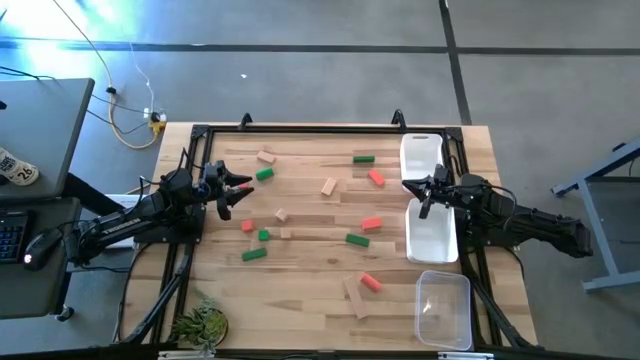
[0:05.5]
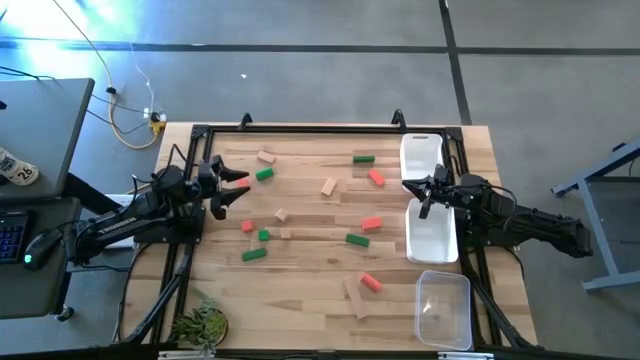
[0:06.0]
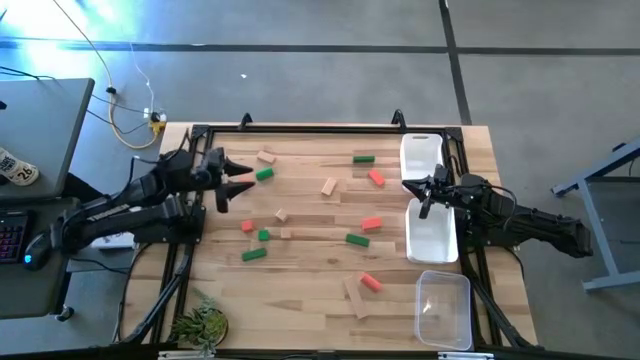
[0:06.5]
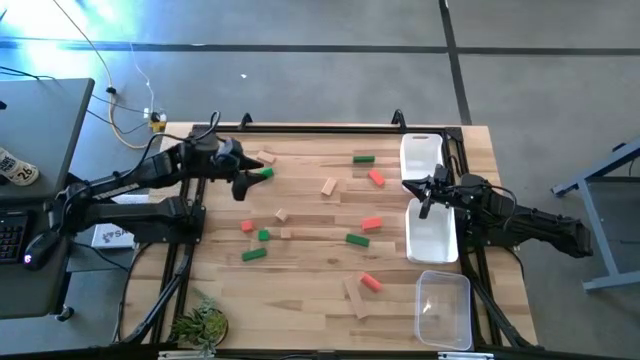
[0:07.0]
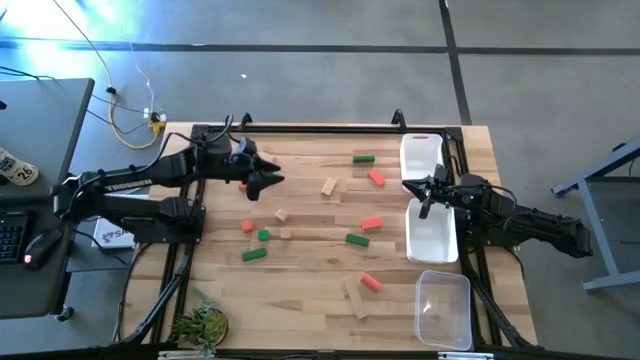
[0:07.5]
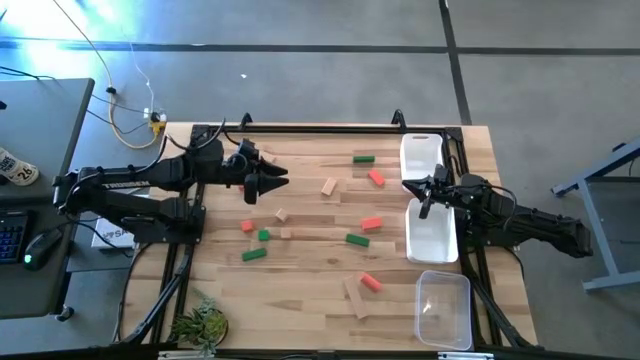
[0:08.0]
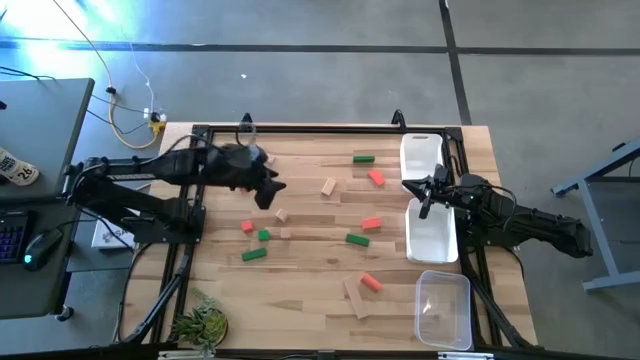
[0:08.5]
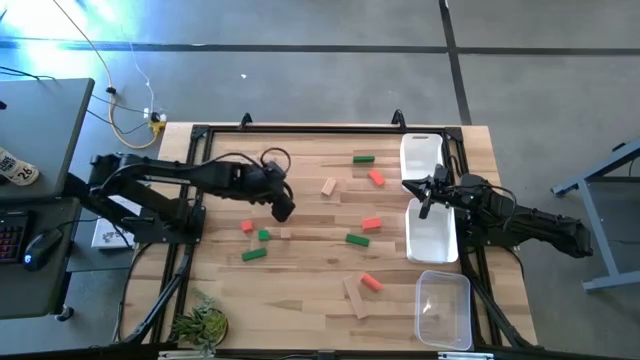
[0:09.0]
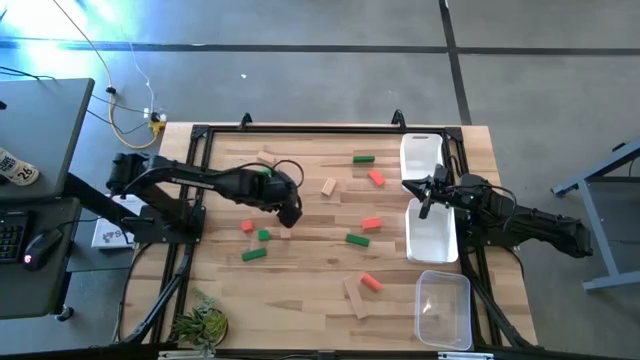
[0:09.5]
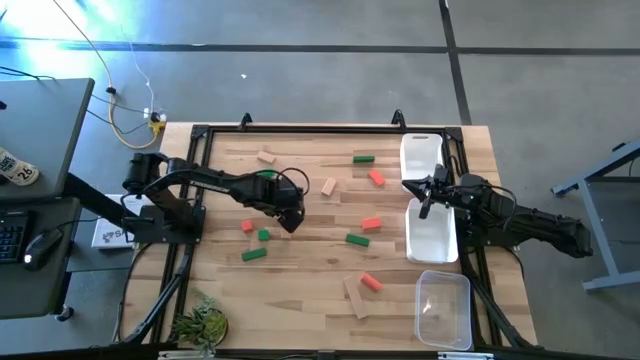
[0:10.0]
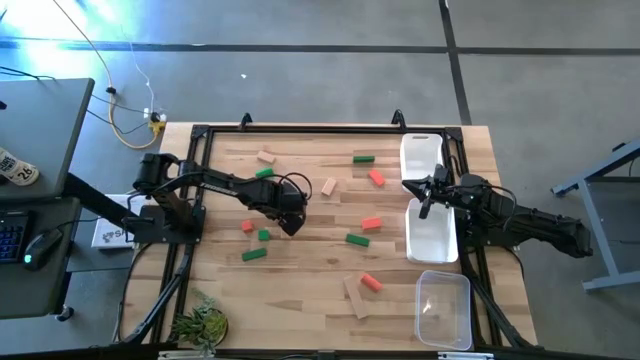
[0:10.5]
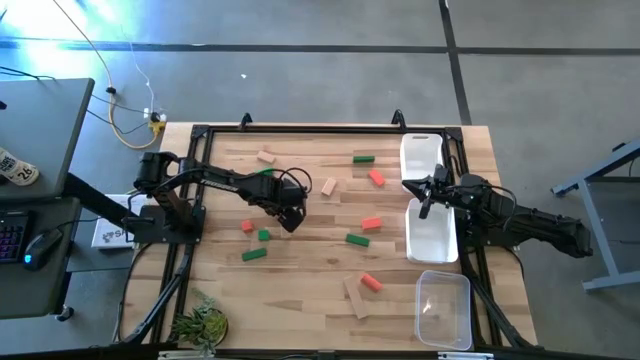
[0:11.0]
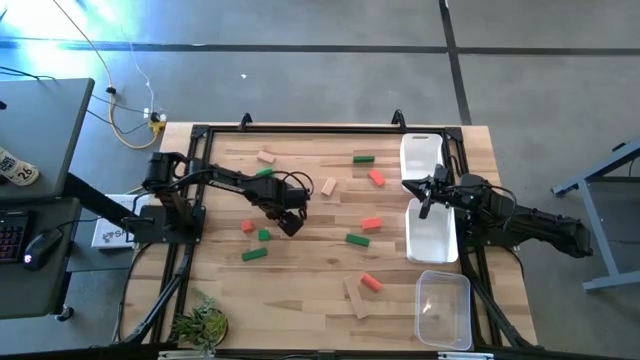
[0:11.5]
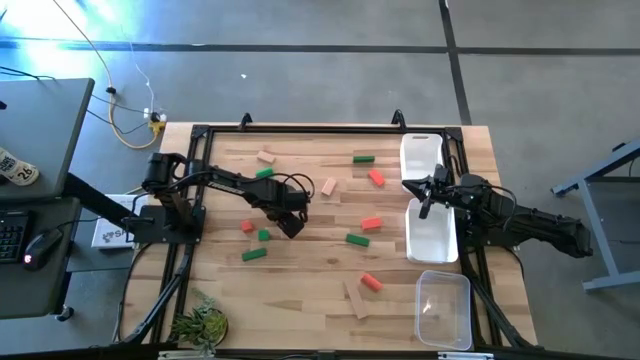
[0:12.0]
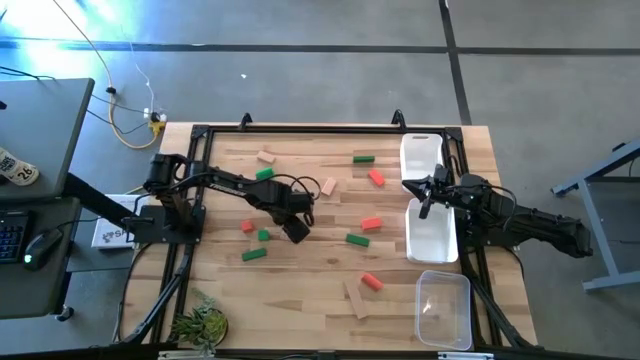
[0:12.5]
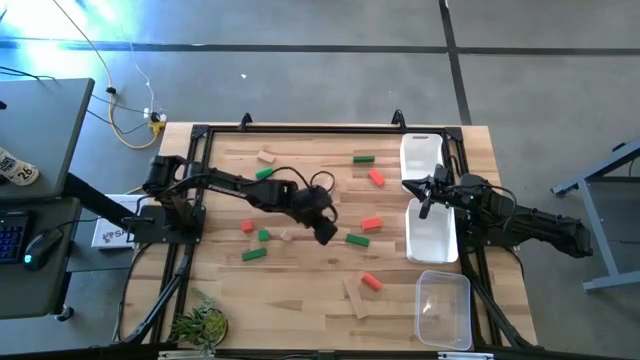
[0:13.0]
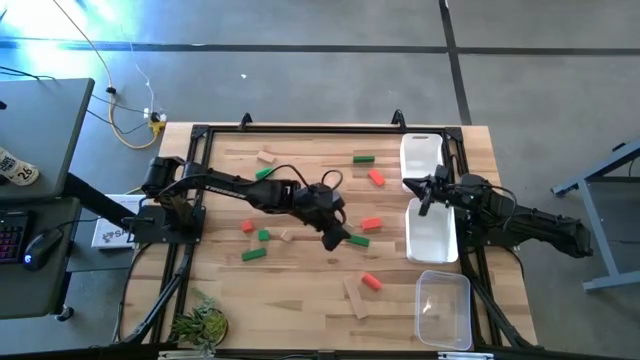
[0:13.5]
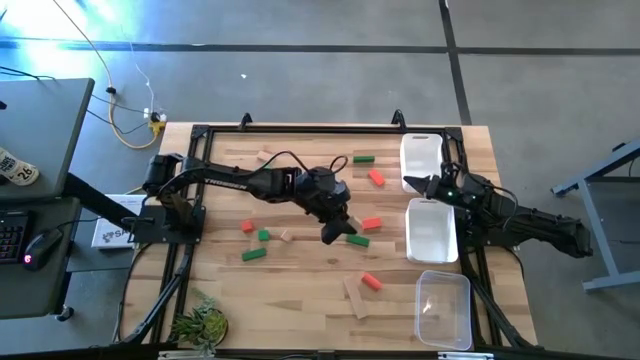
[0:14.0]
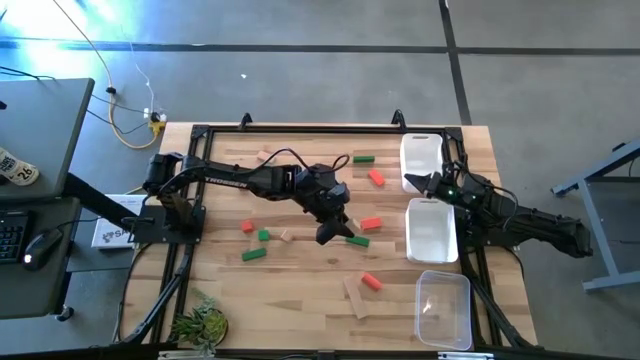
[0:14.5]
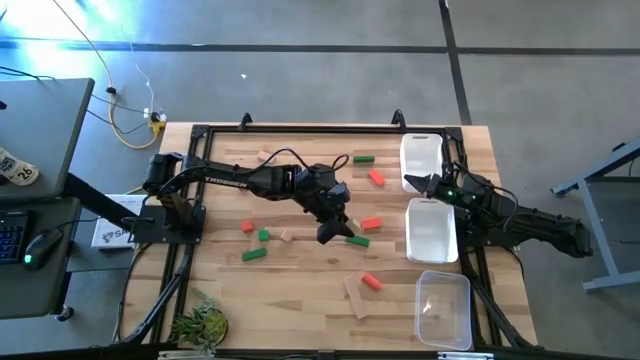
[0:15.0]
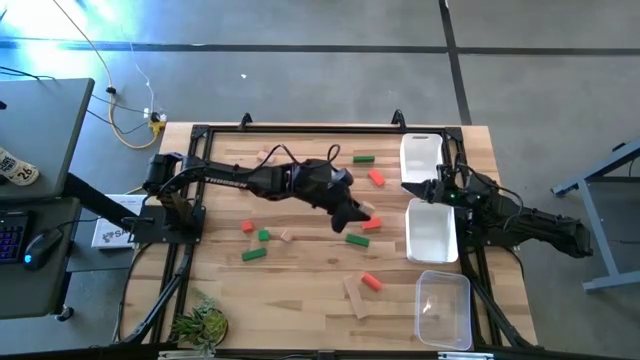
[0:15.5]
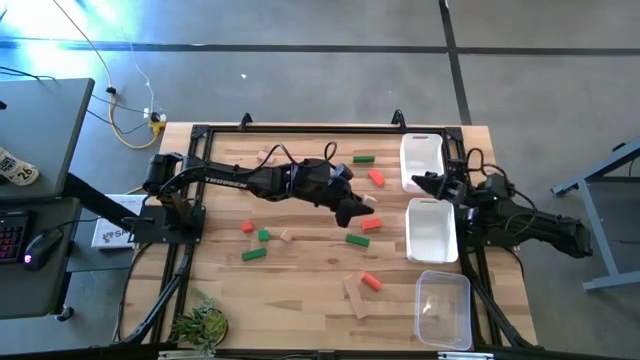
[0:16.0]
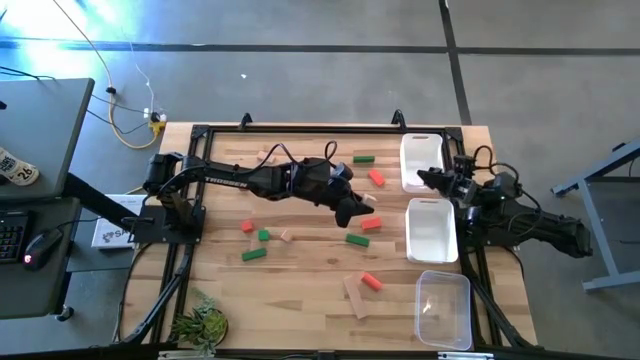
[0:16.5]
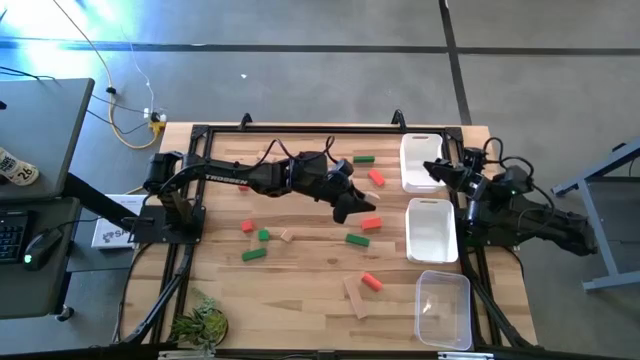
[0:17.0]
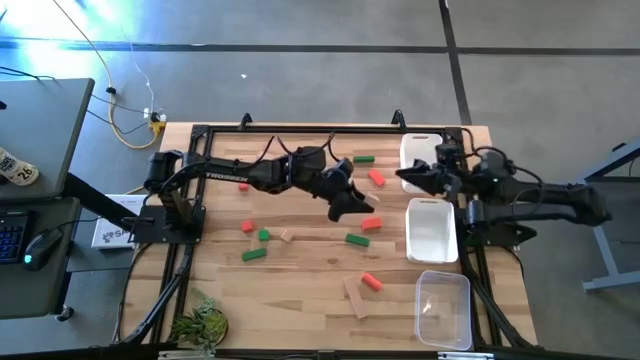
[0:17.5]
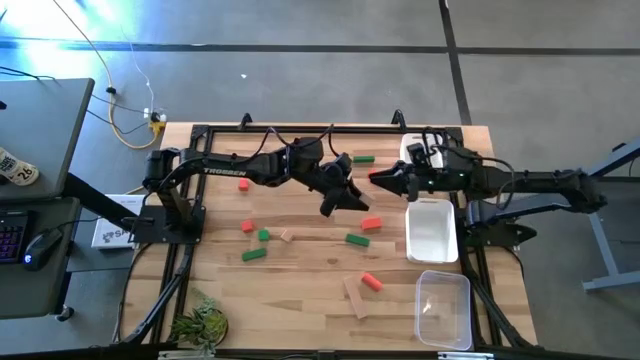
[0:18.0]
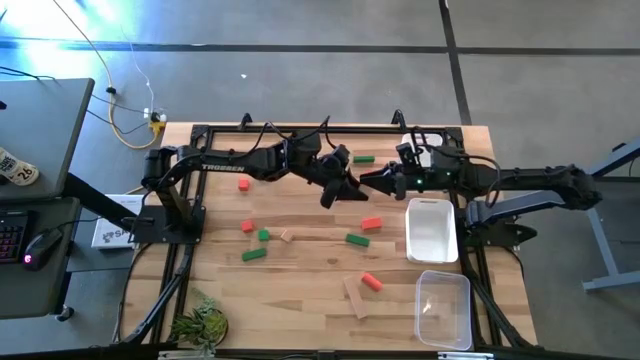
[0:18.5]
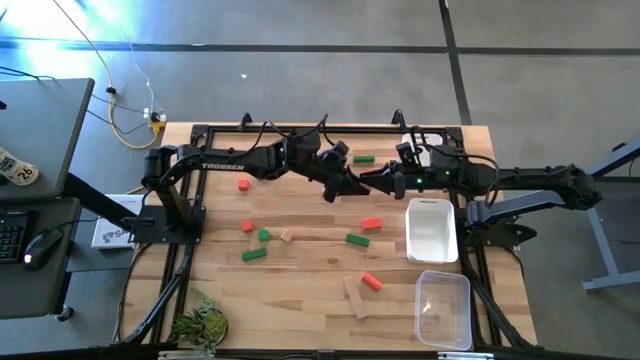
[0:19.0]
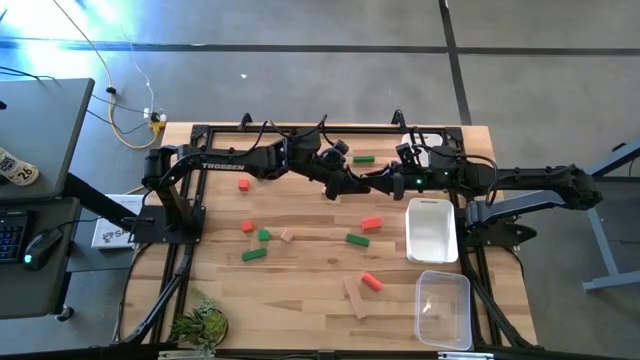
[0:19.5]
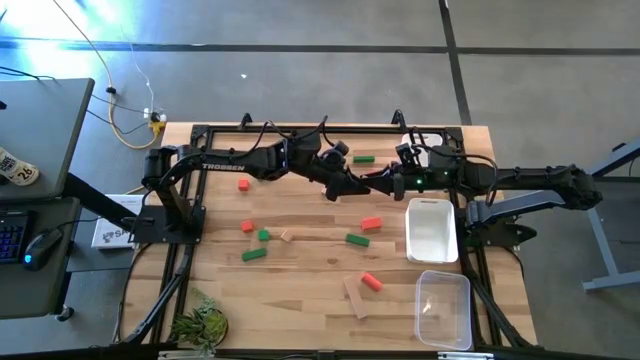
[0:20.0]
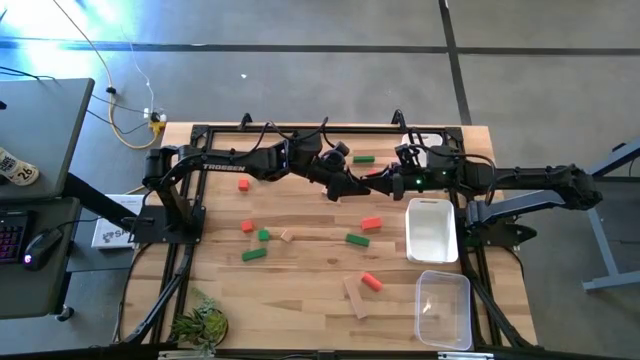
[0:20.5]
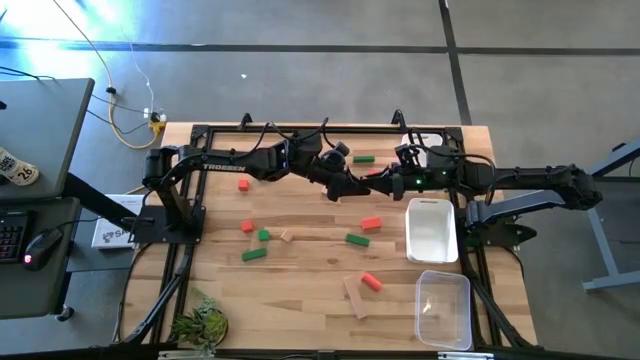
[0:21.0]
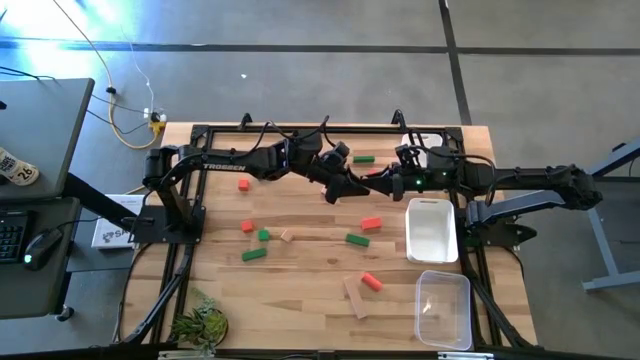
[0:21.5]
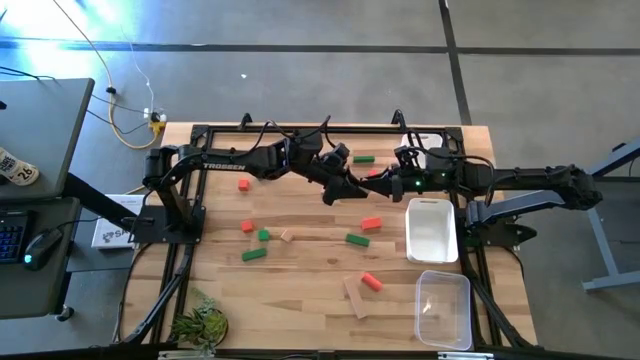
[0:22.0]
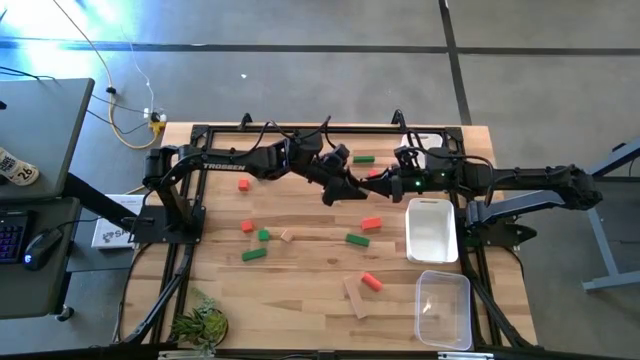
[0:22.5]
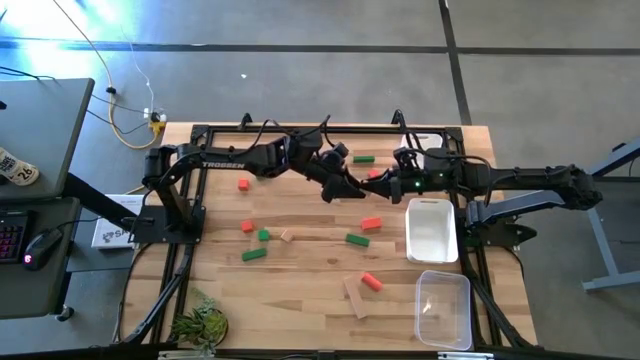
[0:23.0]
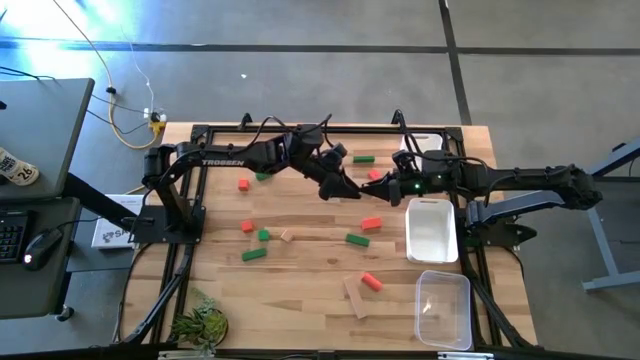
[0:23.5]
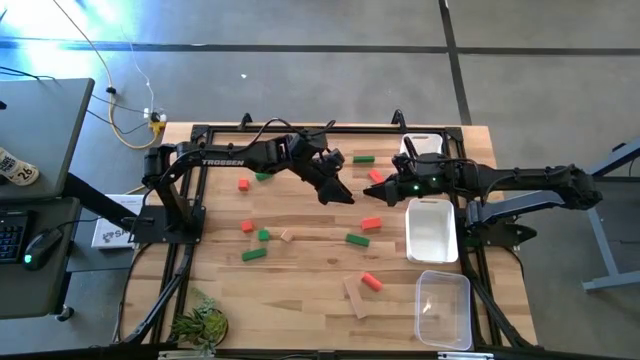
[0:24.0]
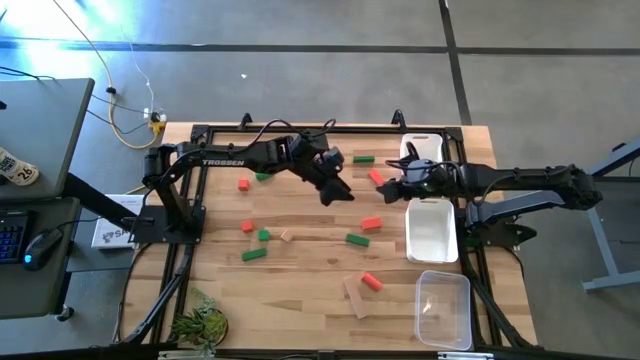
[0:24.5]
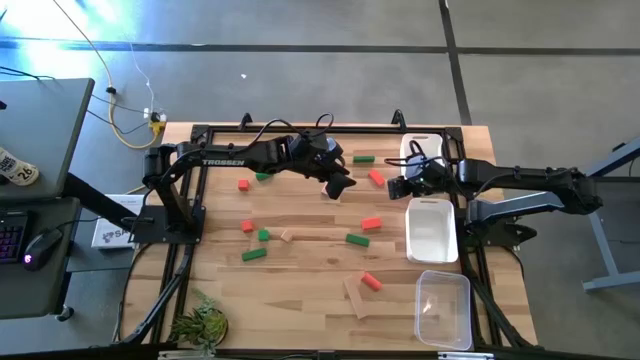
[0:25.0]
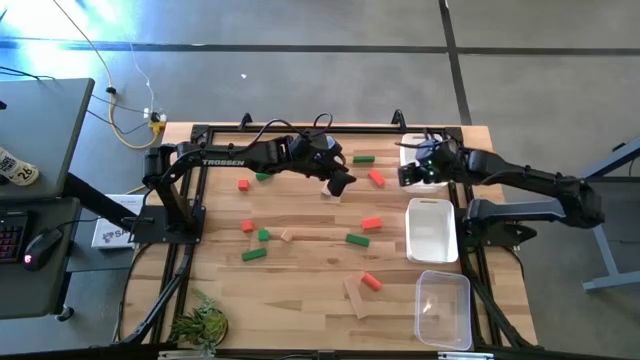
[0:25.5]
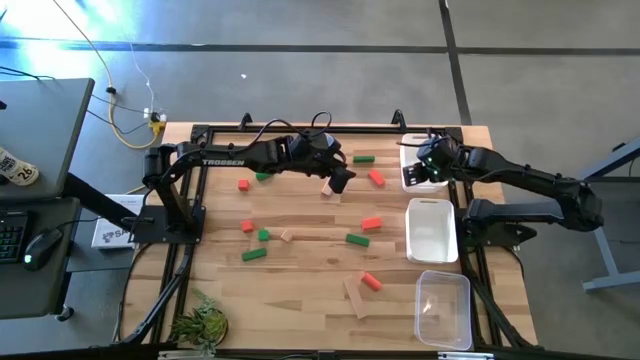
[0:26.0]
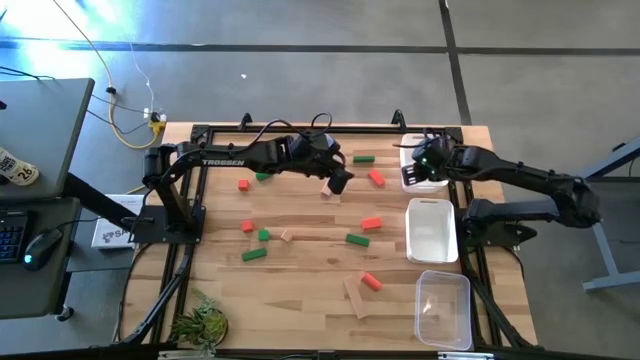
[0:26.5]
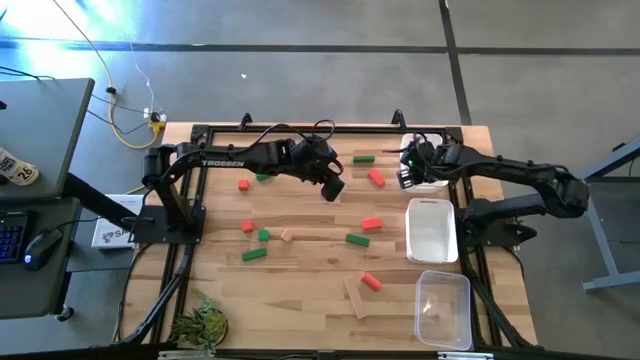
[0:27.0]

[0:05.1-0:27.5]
Task: Sort & place blocks by color
Put the brown block into the top white bin
